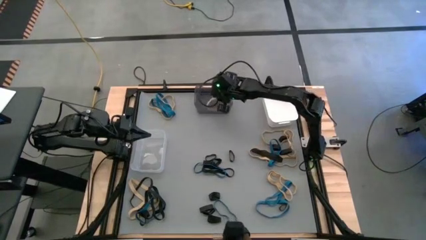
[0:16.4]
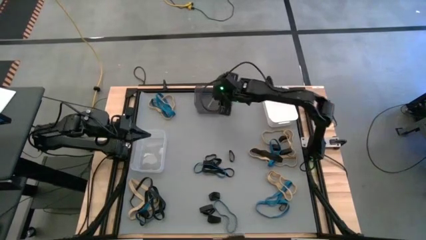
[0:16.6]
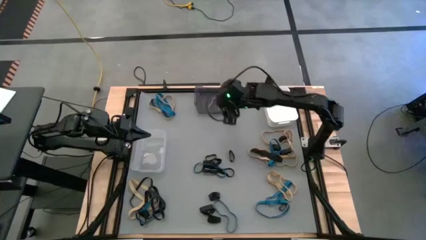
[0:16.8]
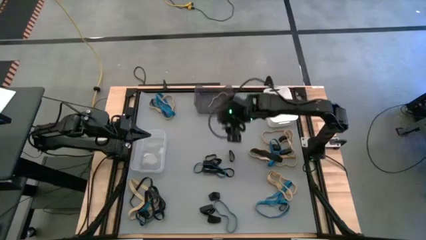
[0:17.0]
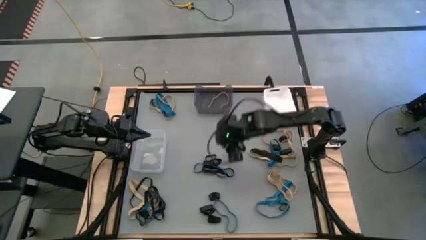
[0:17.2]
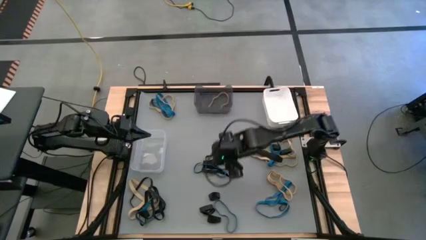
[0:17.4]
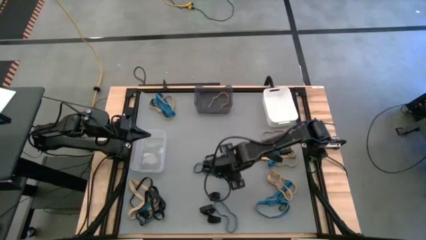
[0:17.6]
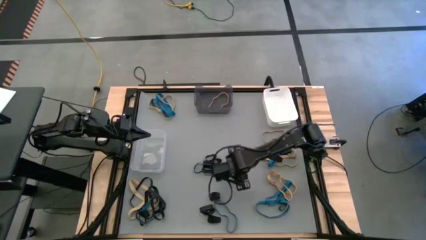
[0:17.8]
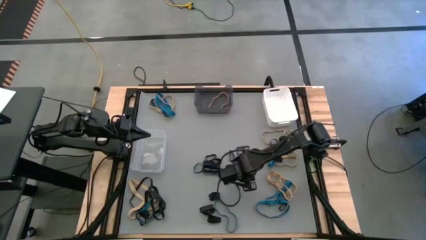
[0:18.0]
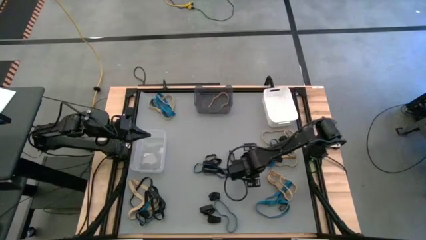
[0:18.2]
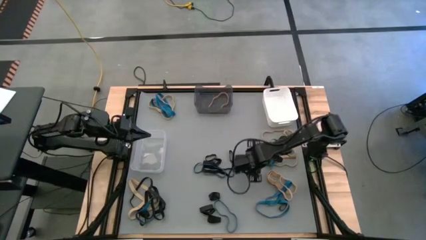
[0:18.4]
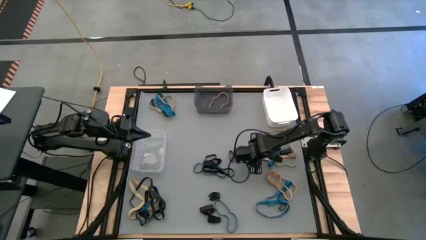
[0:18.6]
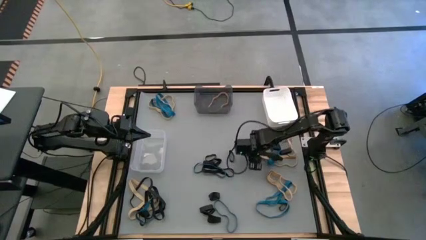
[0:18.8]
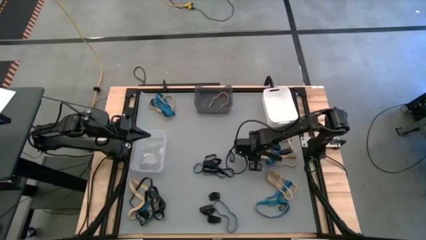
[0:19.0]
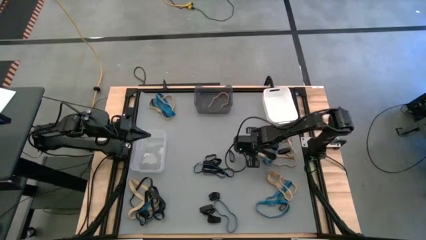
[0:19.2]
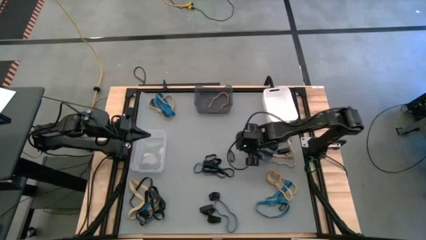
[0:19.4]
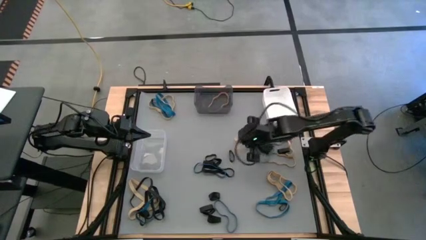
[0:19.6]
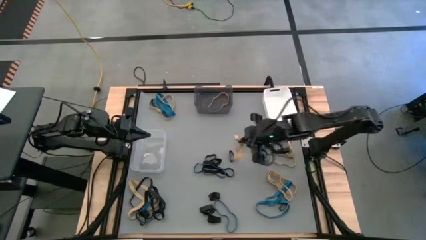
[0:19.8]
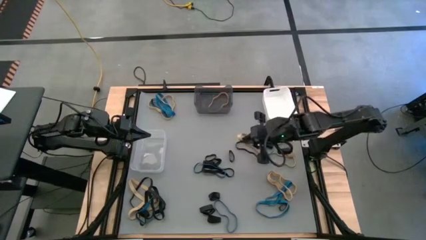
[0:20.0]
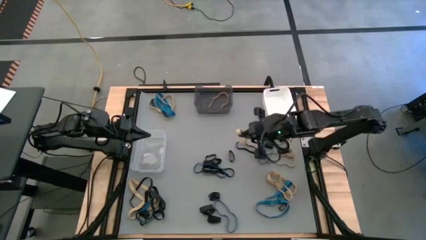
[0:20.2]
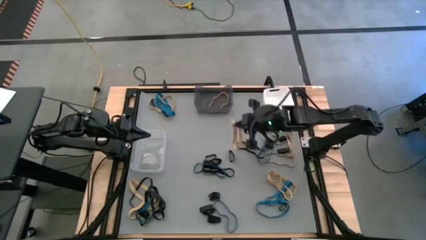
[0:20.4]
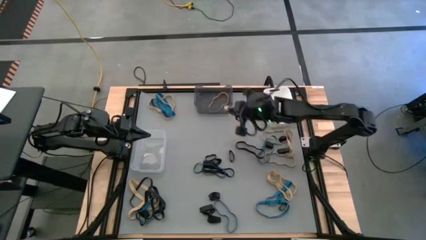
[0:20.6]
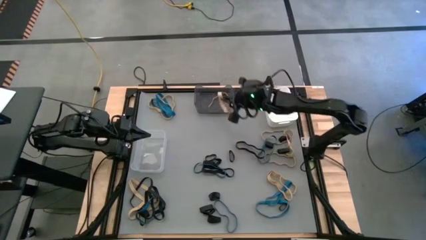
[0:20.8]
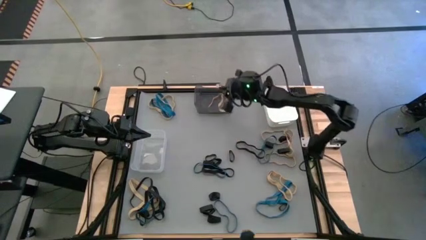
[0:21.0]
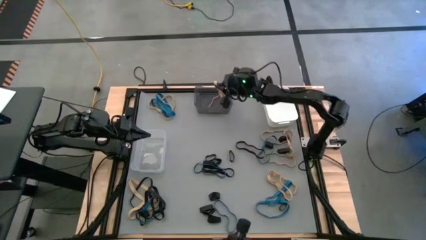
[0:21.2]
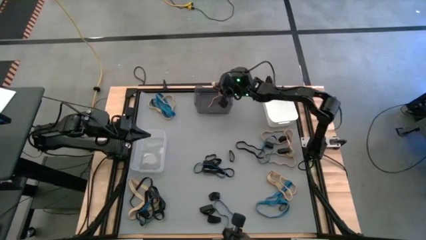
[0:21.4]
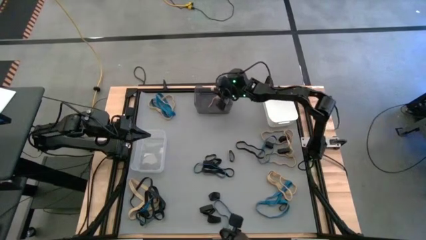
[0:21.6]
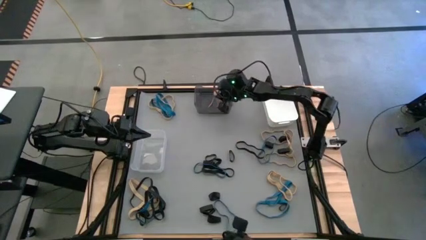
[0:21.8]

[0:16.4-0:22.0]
Task: Sort rubber bands into baskets
Put the brown rubber band into the black bin

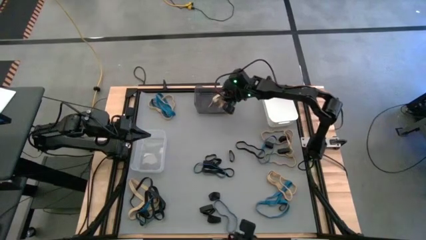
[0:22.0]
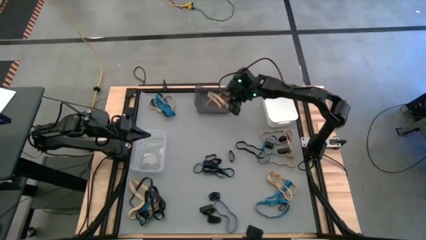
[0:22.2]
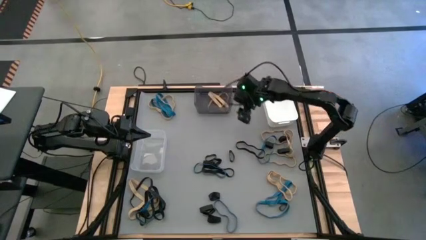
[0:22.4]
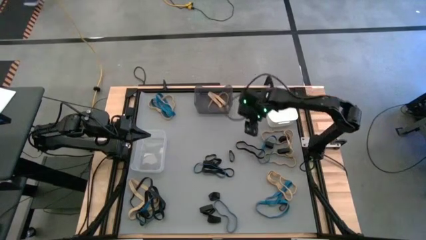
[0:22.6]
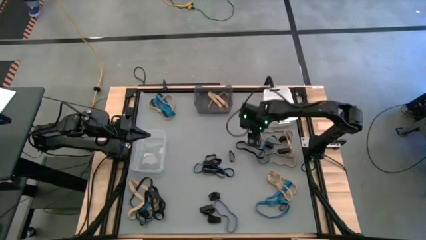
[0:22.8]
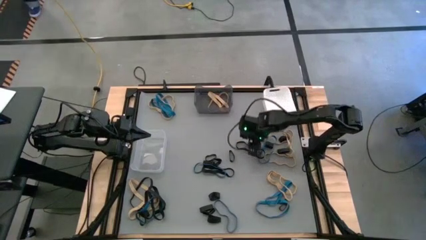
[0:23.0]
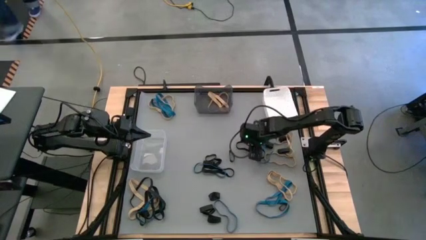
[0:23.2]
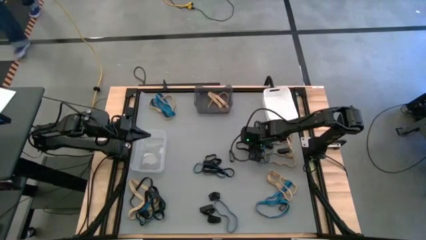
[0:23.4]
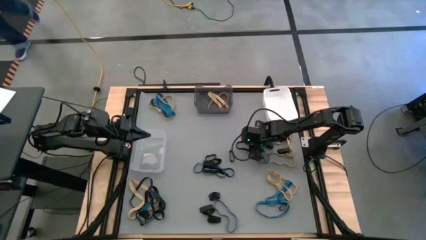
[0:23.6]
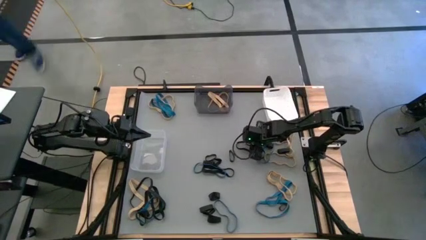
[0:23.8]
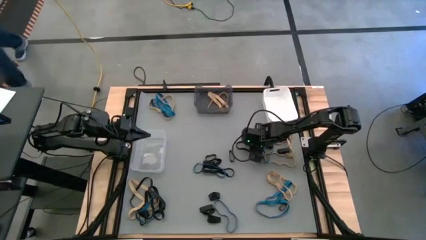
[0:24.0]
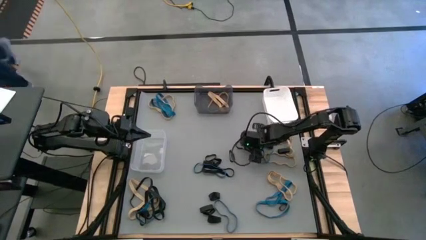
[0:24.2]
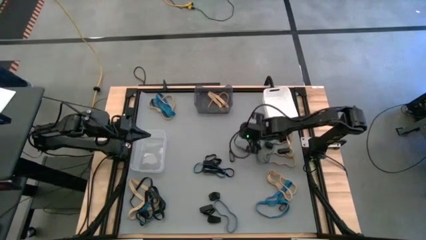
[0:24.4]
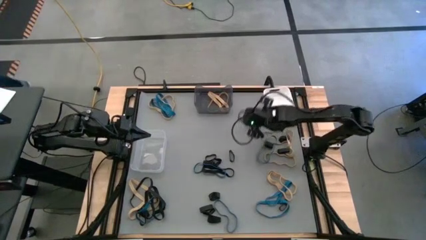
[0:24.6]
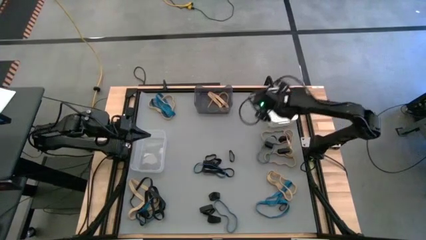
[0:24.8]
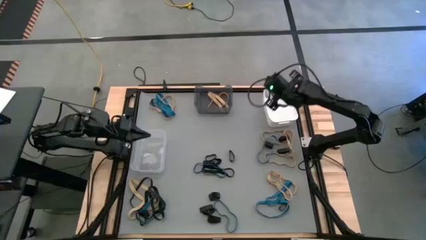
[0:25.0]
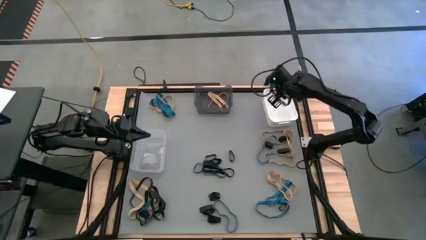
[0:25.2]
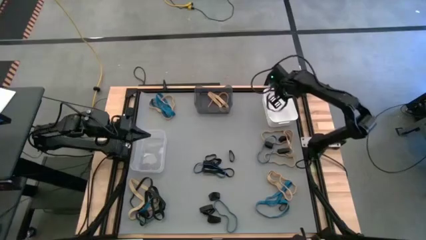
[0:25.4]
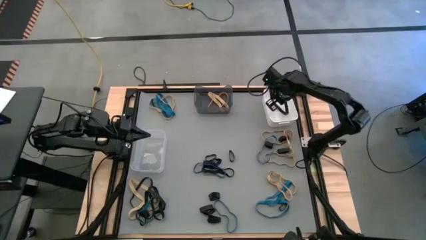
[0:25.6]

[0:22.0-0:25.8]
Put the black rubber band into the white bin

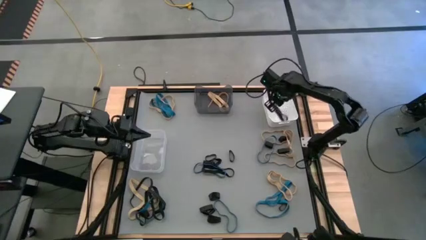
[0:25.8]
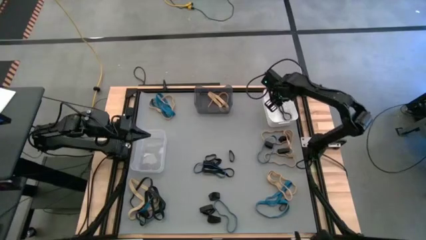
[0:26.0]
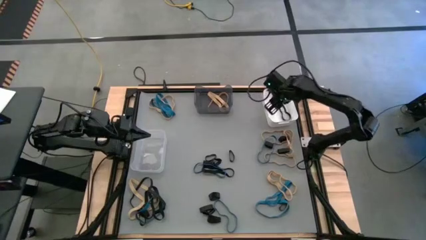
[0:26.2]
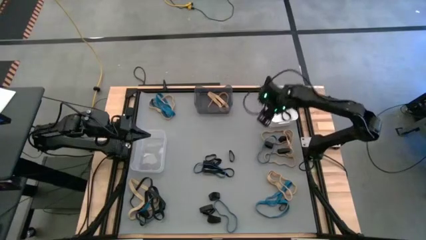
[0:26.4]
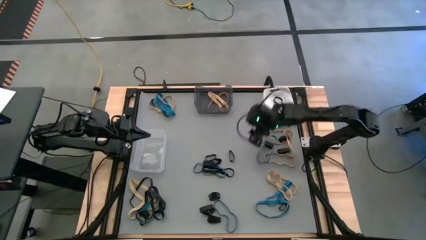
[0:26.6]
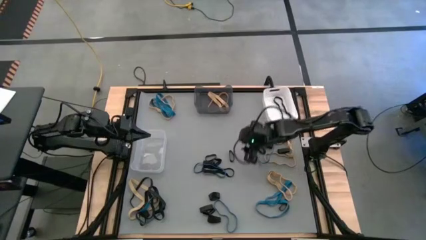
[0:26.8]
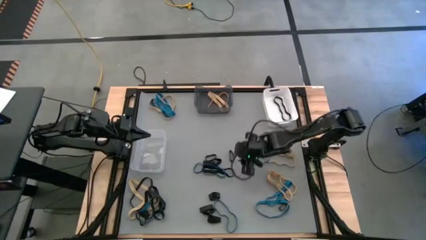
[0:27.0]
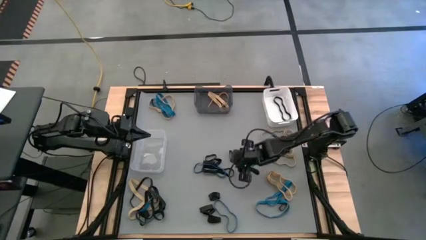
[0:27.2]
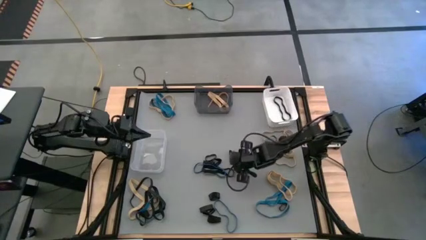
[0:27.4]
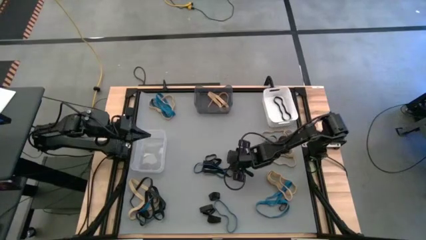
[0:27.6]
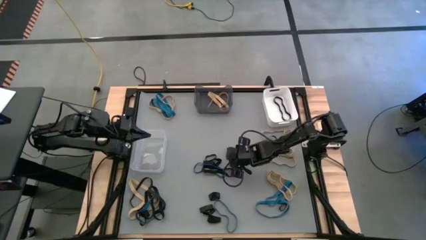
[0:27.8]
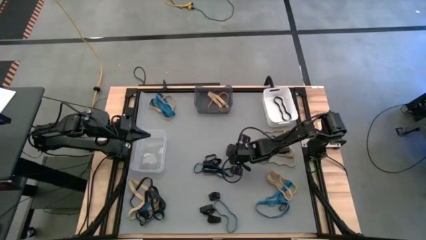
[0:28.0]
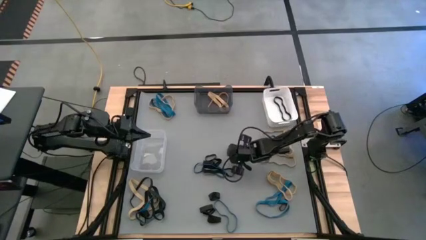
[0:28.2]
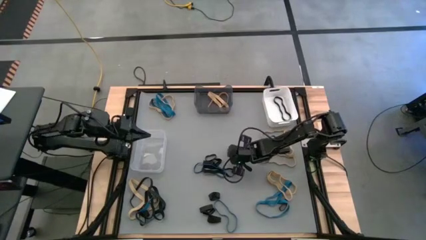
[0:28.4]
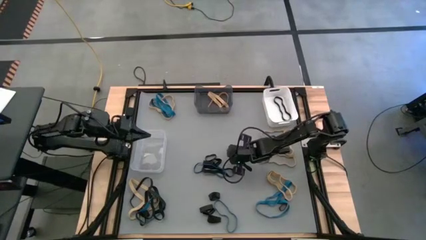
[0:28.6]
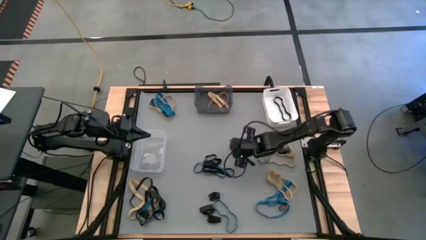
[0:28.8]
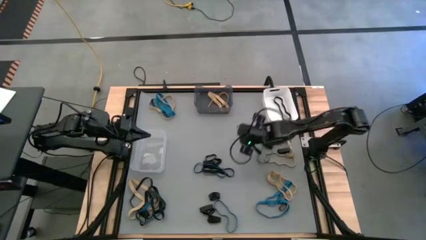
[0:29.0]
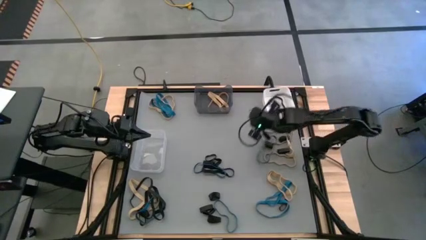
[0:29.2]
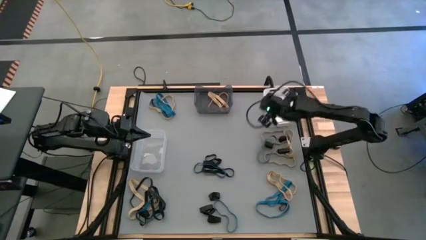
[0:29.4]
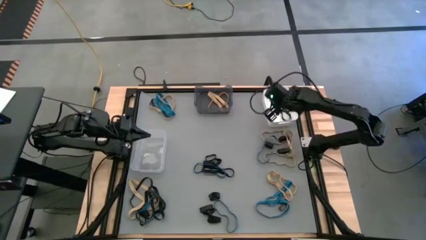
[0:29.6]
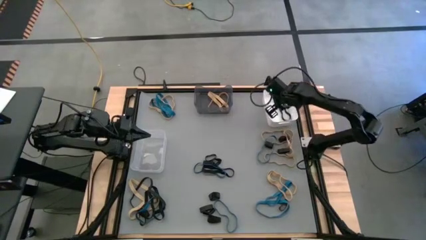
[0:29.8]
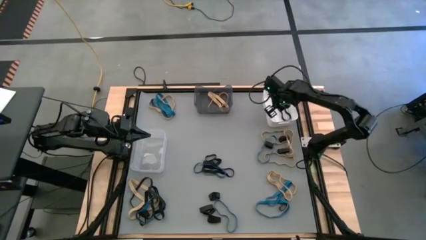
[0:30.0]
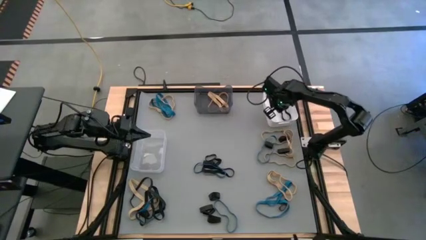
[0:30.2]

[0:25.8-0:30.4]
Put the black rubber band into the white bin

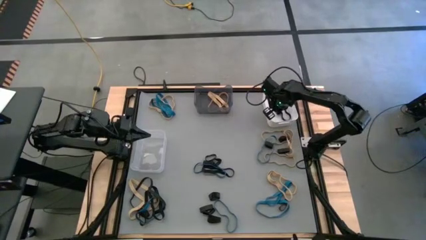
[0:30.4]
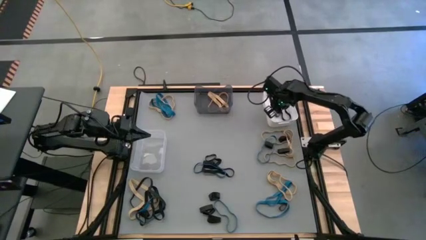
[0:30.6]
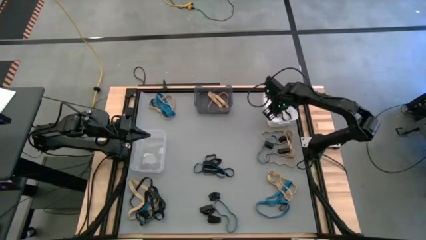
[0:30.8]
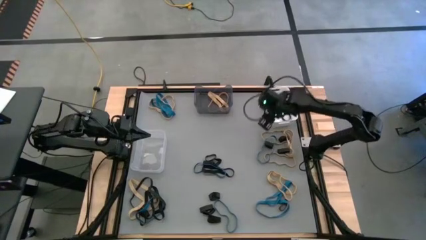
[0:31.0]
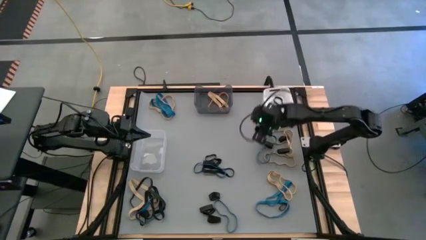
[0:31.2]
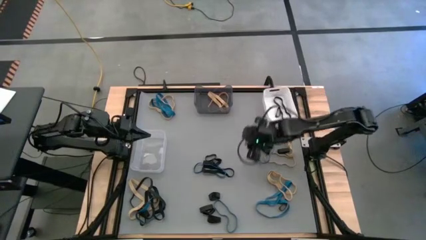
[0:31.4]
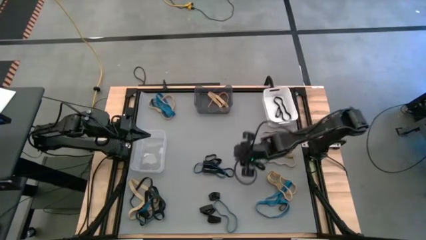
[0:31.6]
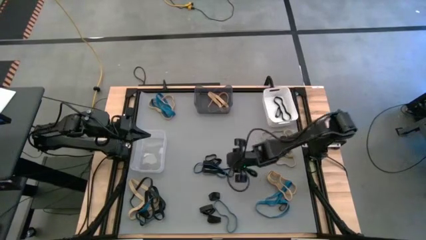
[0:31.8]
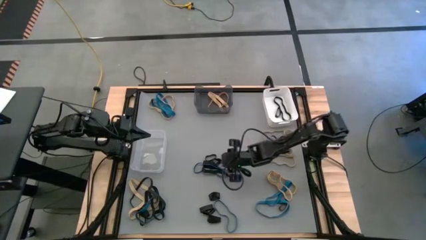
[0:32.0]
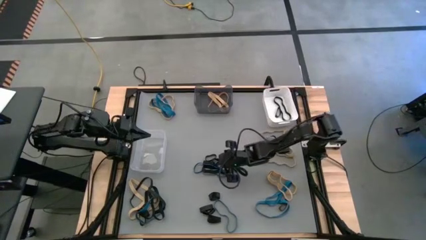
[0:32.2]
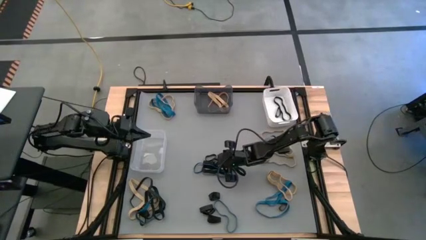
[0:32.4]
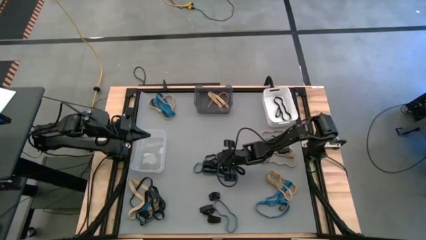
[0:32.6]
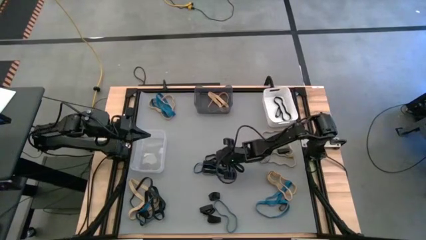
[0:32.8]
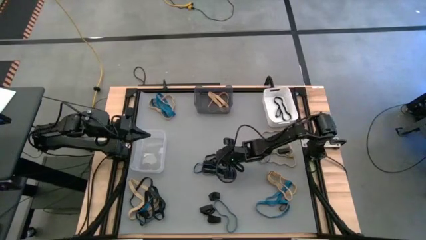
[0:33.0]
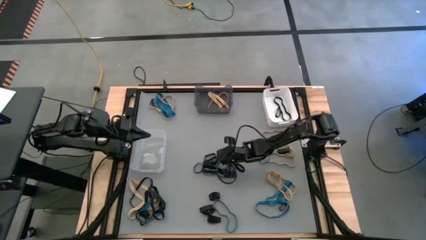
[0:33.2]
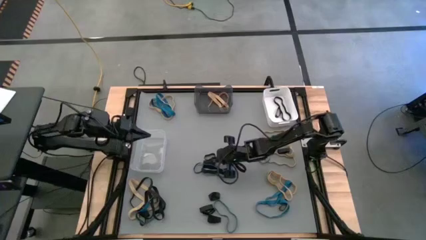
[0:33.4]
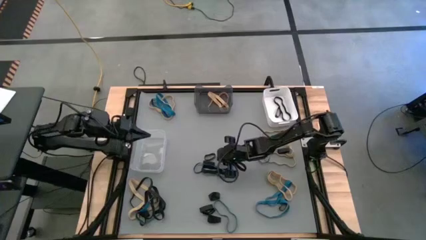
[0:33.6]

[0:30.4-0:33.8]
Put the black rubber band into the white bin
